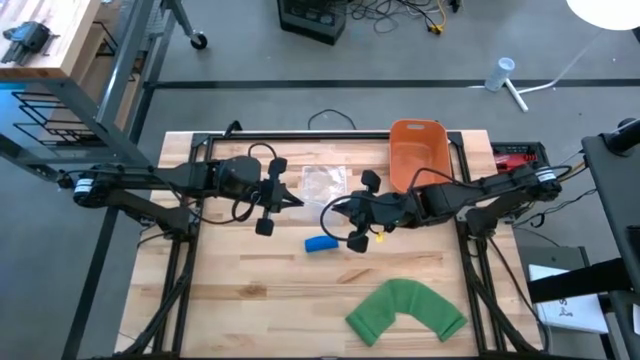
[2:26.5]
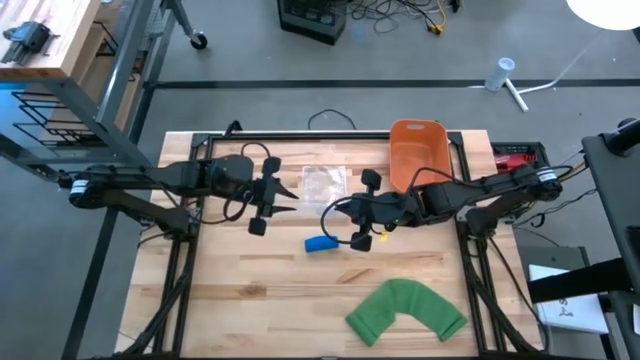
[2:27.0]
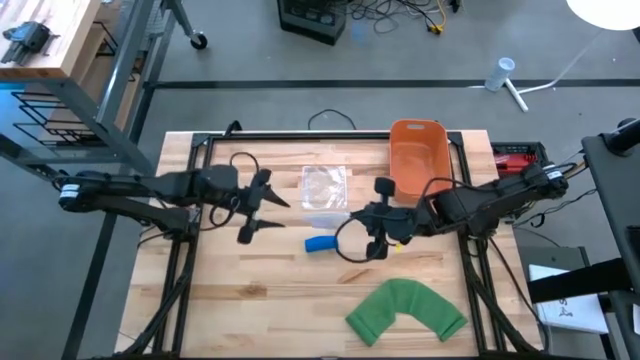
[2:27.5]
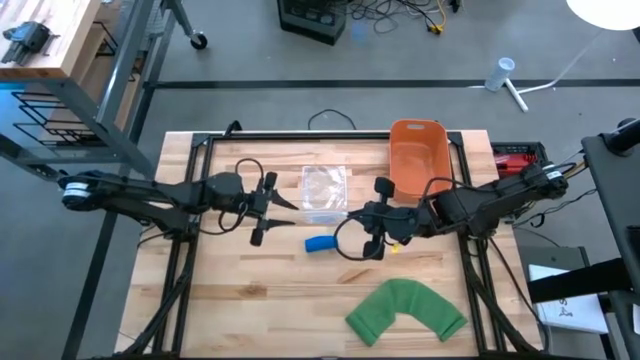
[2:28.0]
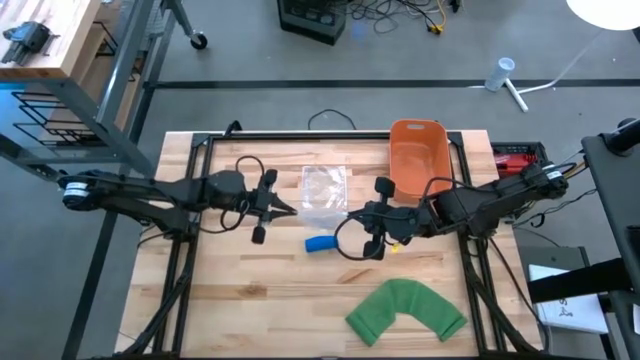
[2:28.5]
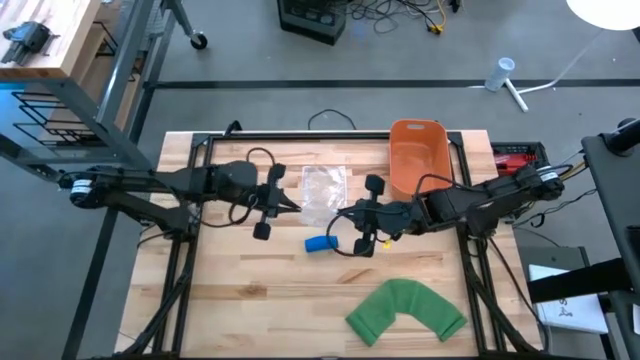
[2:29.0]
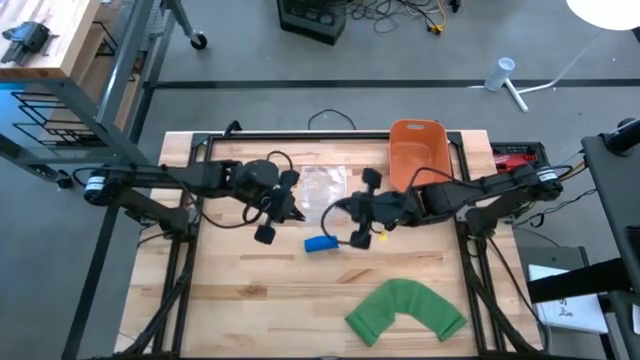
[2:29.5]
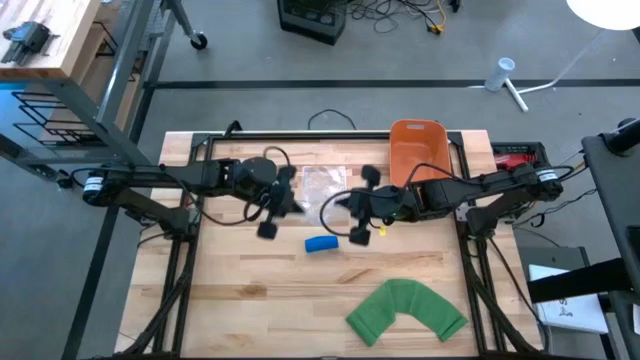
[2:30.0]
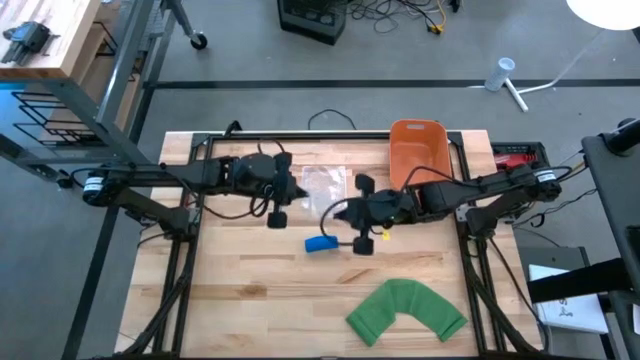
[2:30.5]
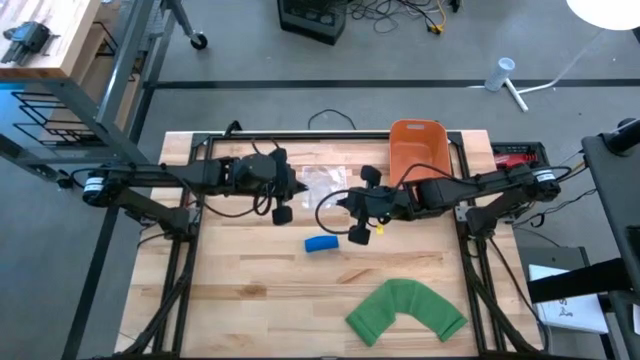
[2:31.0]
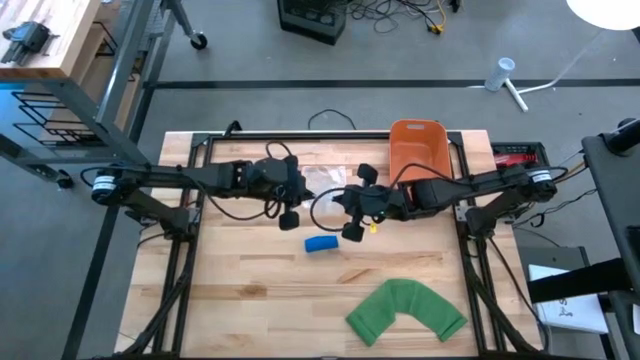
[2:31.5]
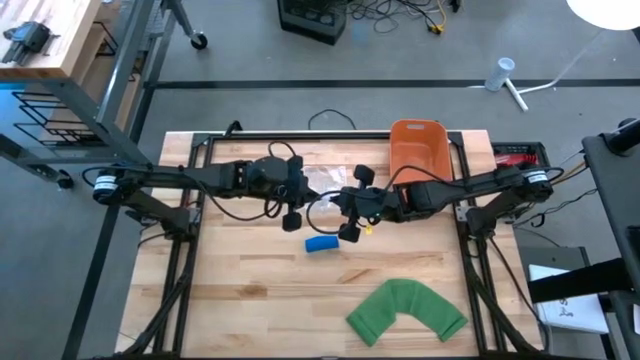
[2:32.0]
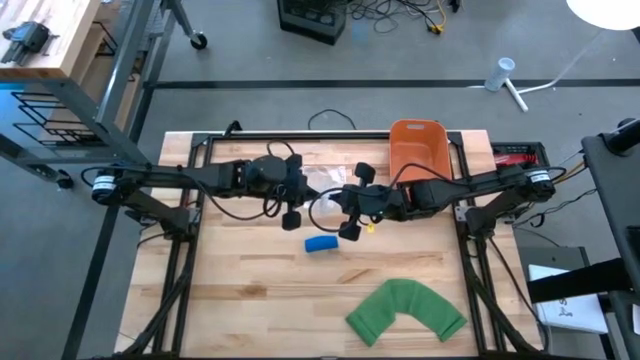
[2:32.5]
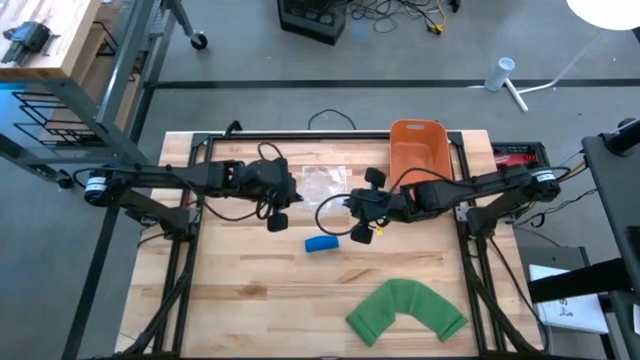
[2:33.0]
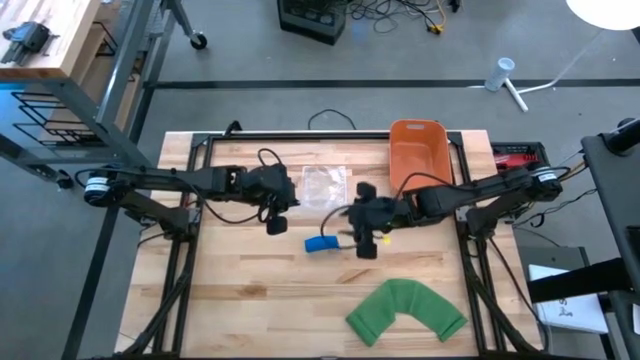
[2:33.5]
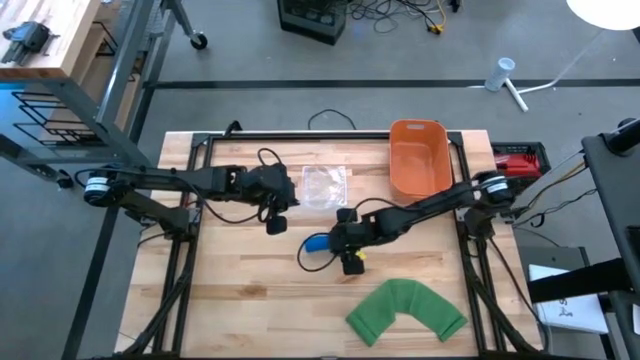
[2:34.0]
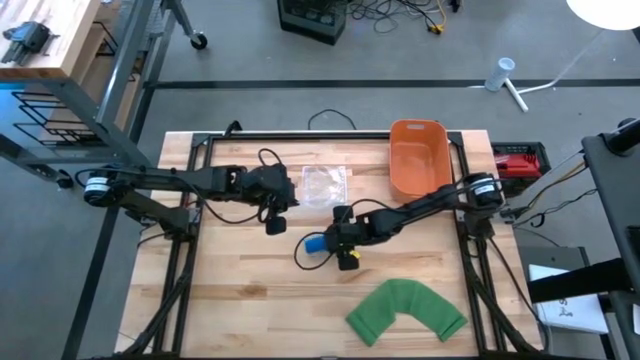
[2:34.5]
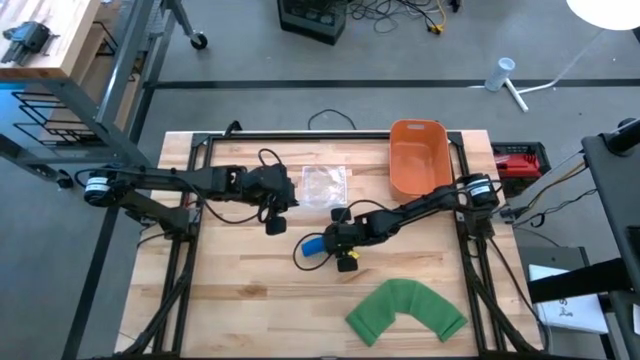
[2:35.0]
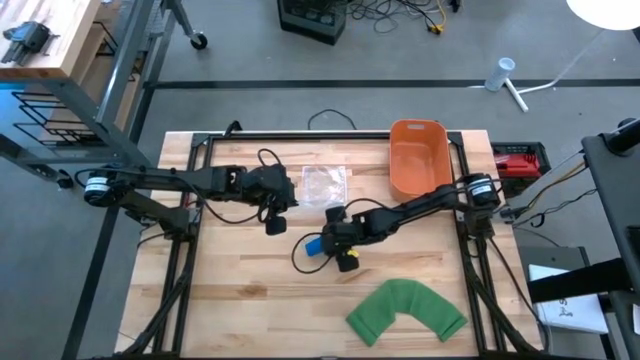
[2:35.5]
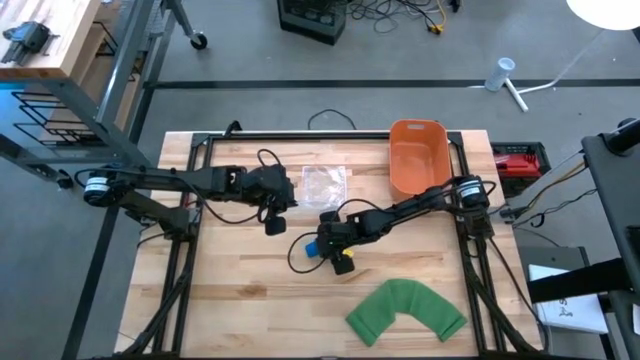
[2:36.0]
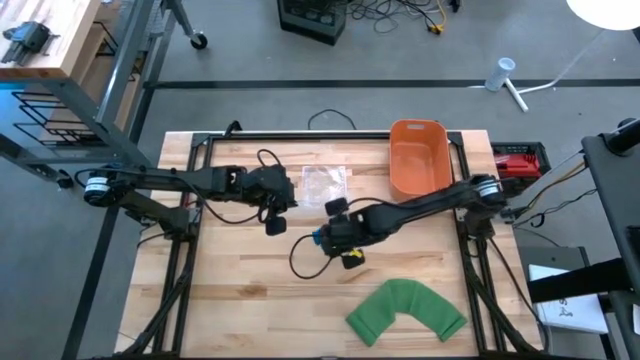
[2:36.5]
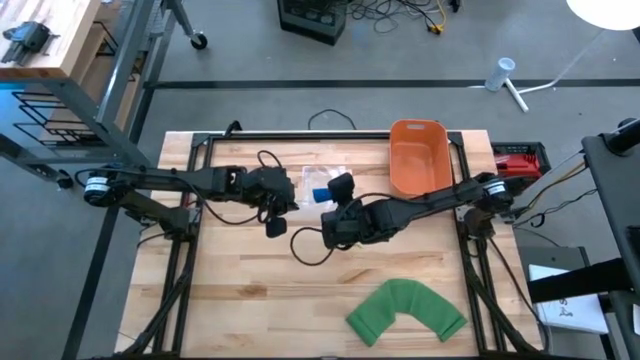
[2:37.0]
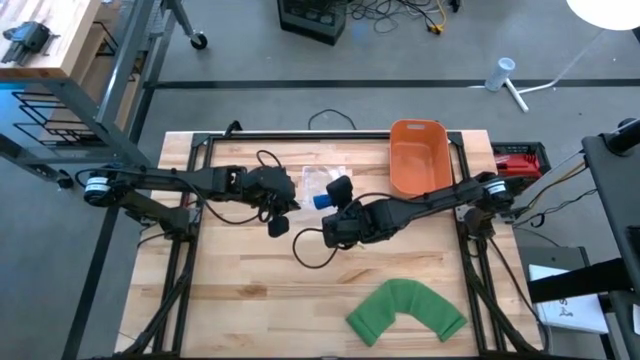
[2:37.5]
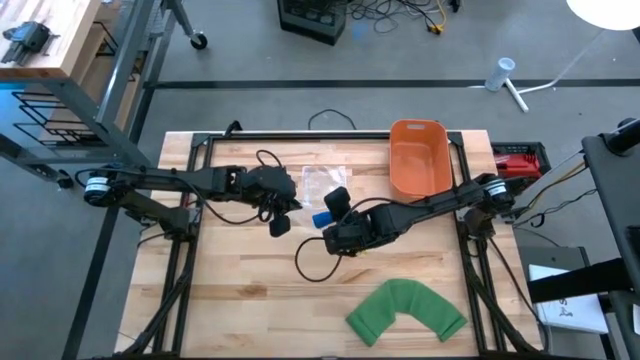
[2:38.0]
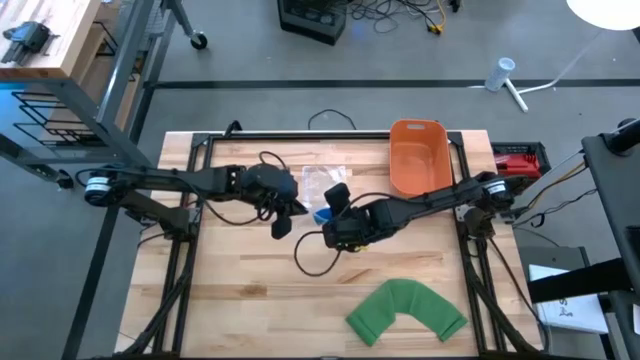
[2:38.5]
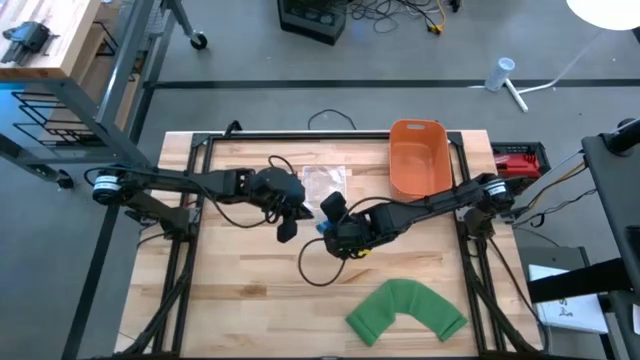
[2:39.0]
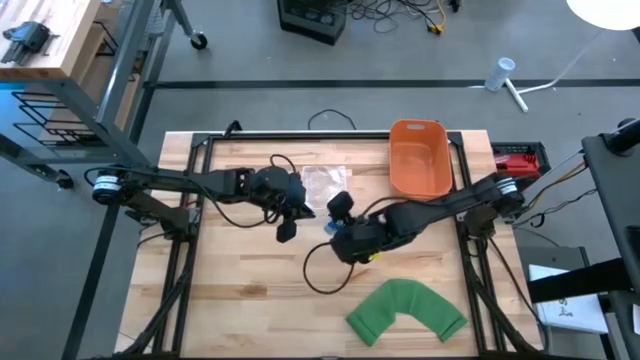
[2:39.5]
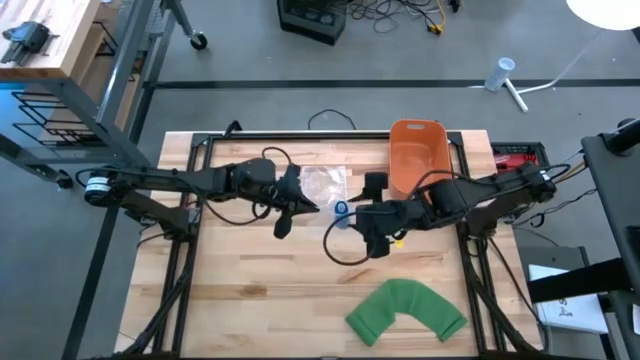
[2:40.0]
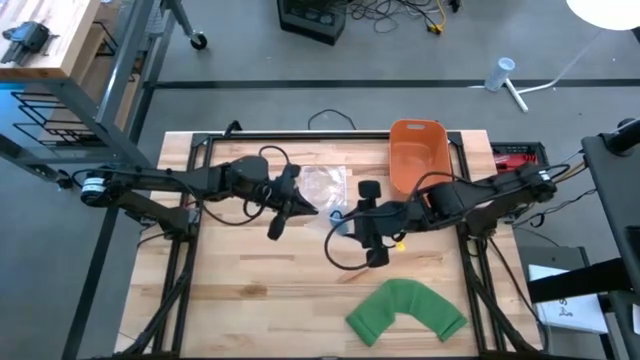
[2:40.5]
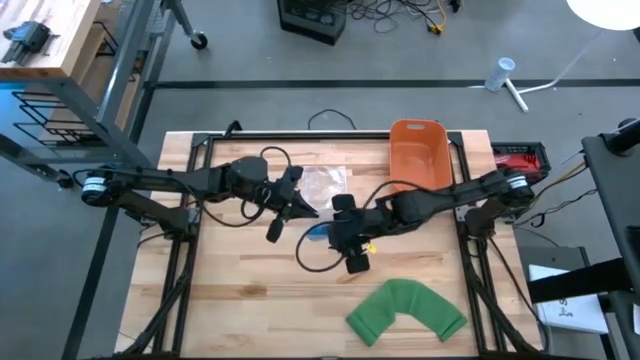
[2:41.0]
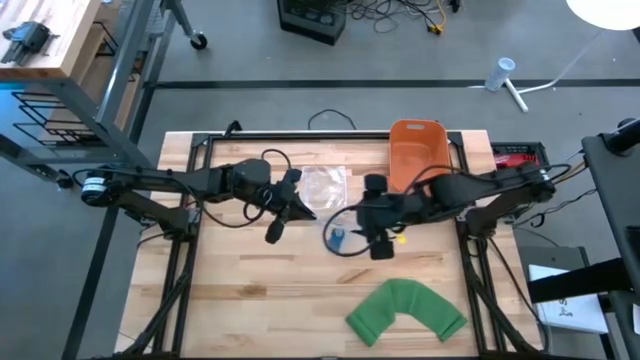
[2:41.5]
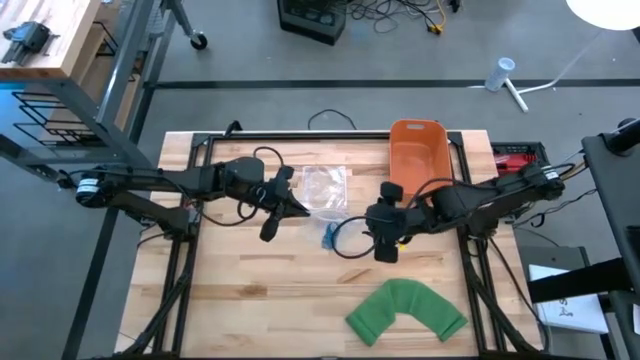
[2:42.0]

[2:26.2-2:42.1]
Task: Roll bandage
Put the blue rolled bandage into the zip lock

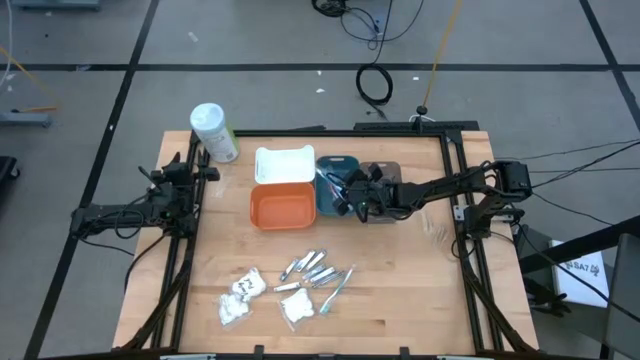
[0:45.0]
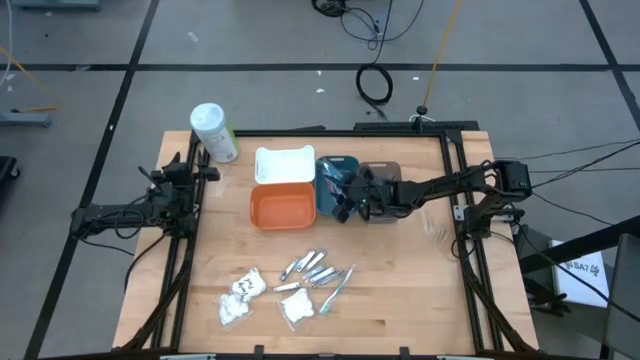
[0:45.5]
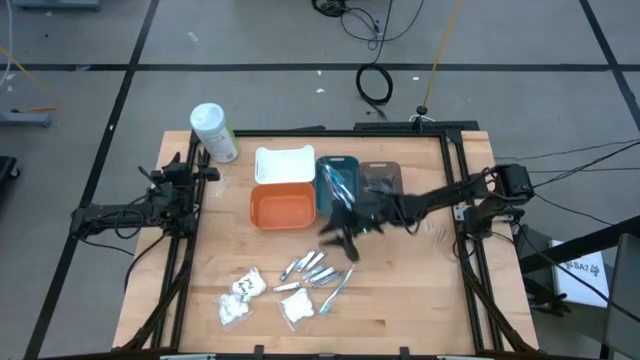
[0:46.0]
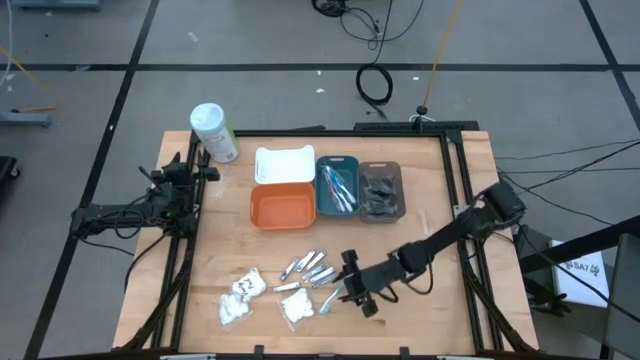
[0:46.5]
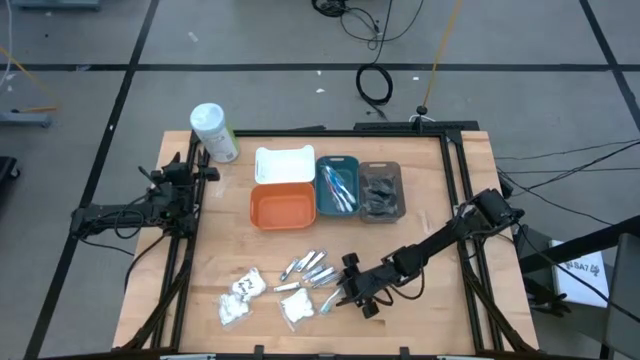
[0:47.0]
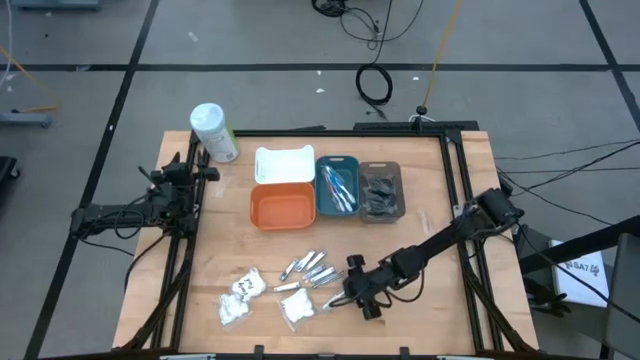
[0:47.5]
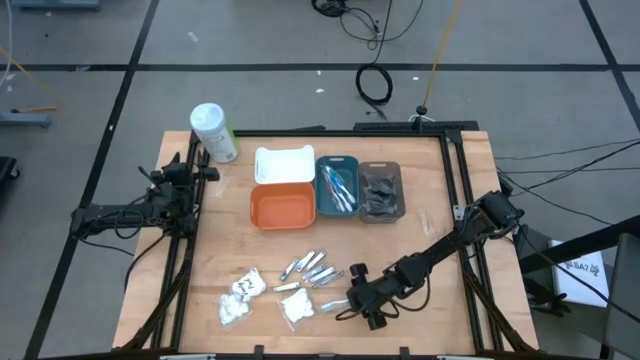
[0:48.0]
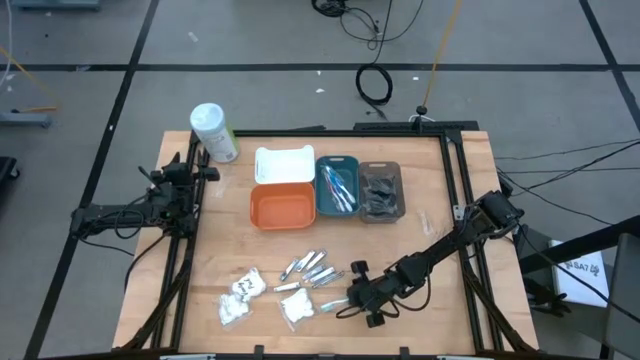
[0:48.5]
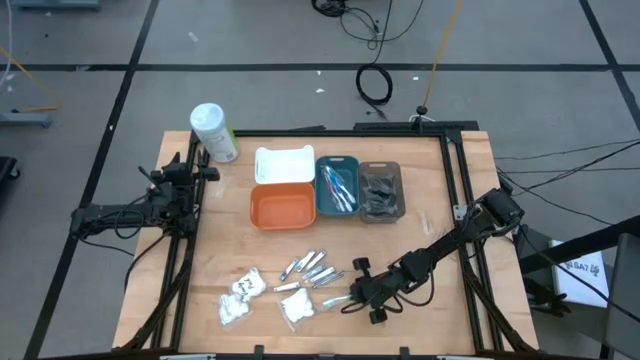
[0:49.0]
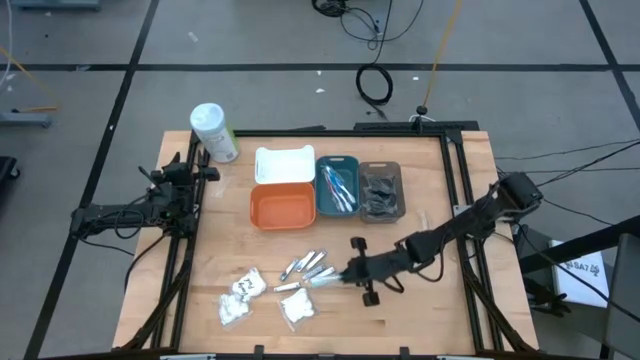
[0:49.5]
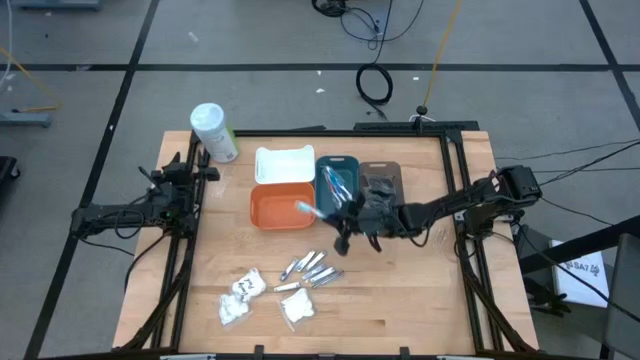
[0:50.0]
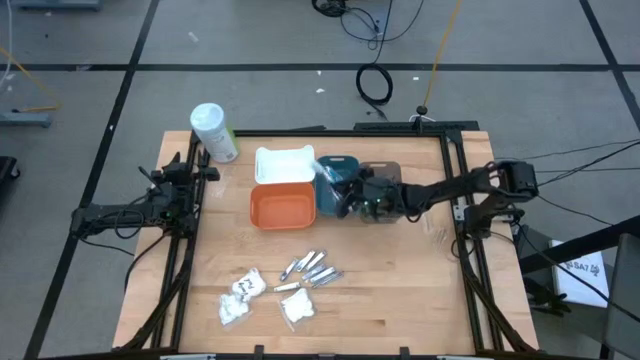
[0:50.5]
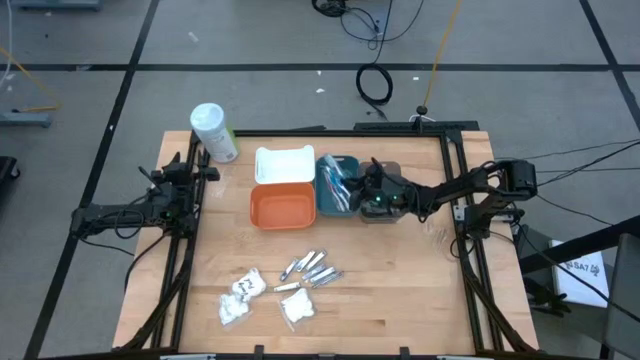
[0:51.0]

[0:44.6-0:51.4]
Task: Pick & Place Travel size toiletries
Put the green toothbrush into the dark green bin
